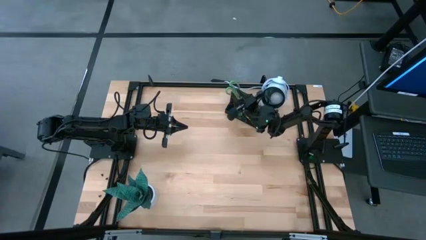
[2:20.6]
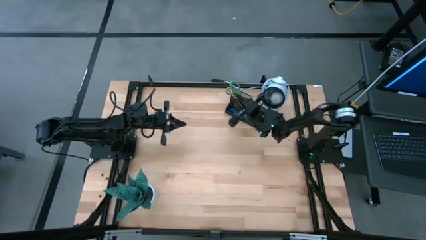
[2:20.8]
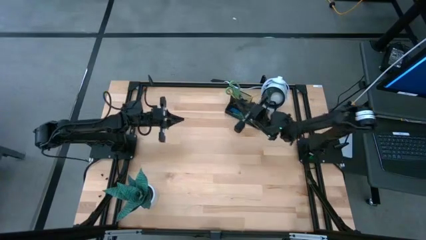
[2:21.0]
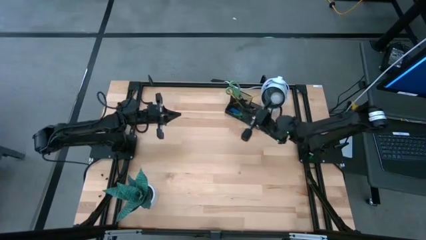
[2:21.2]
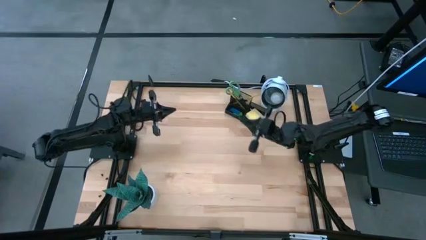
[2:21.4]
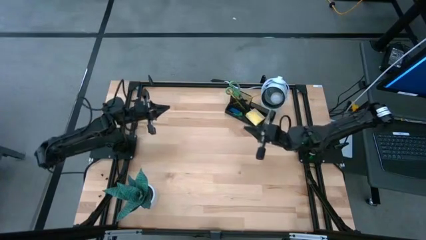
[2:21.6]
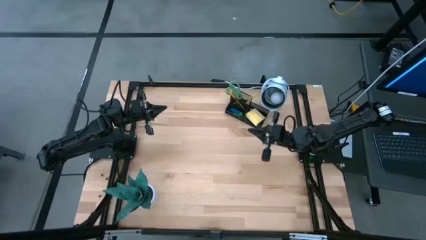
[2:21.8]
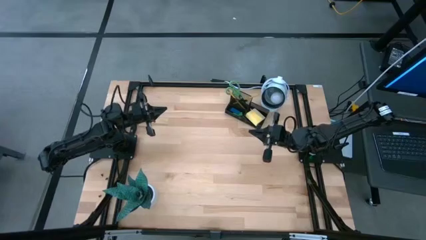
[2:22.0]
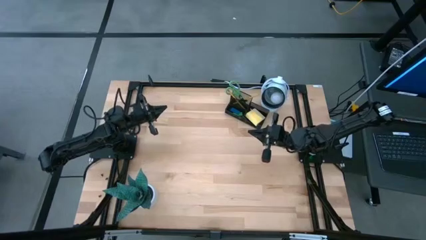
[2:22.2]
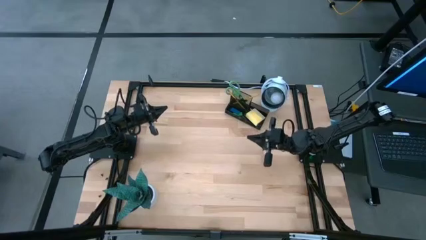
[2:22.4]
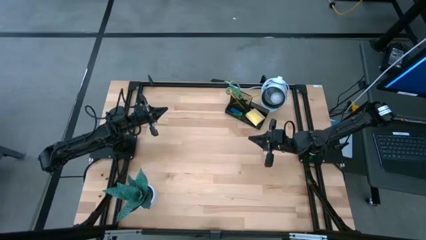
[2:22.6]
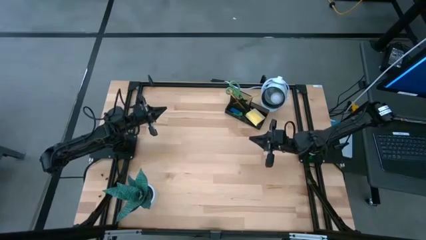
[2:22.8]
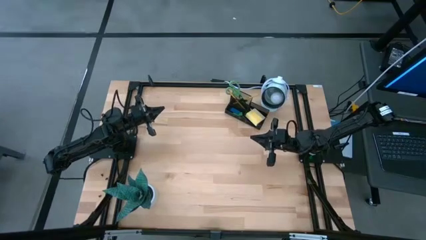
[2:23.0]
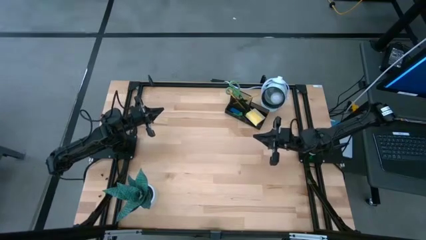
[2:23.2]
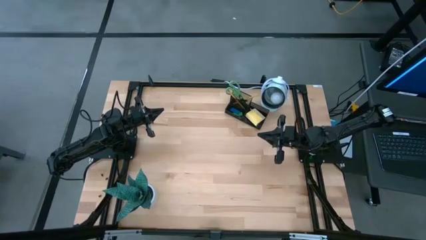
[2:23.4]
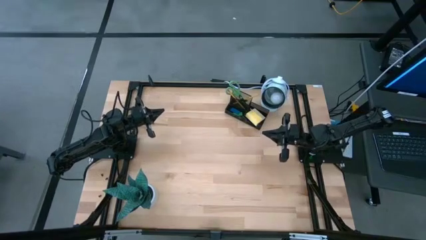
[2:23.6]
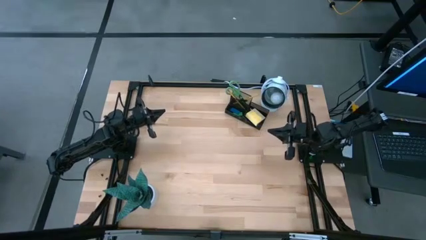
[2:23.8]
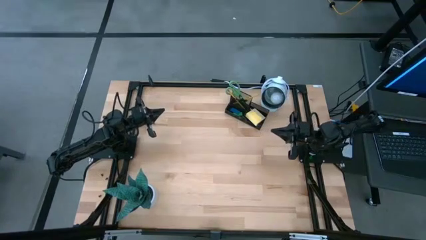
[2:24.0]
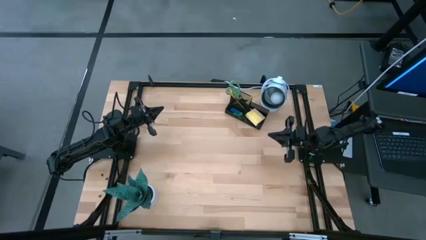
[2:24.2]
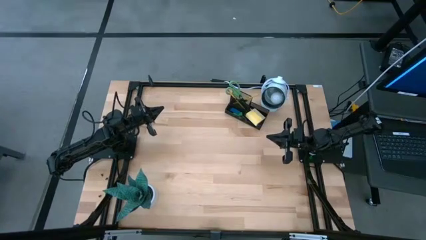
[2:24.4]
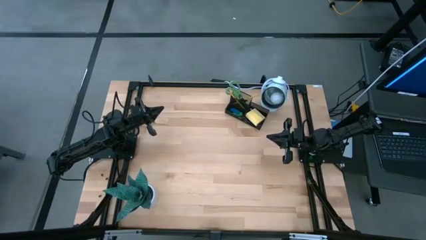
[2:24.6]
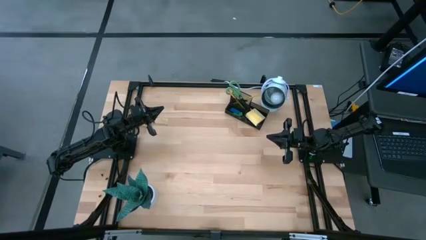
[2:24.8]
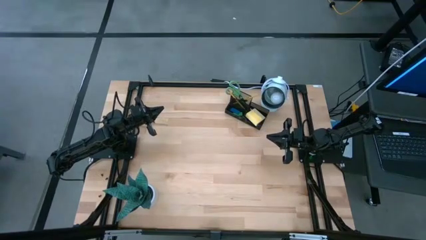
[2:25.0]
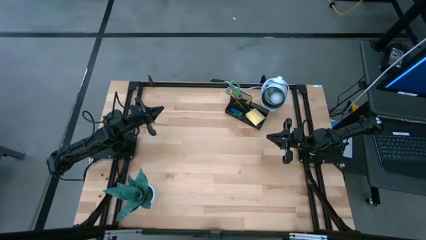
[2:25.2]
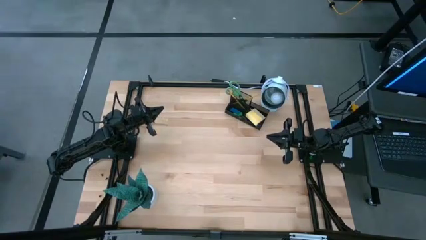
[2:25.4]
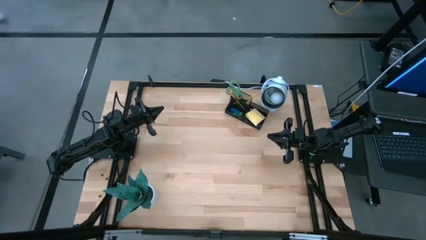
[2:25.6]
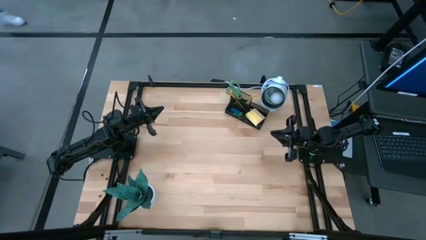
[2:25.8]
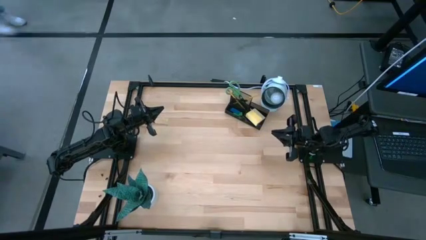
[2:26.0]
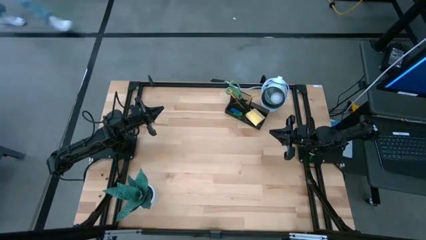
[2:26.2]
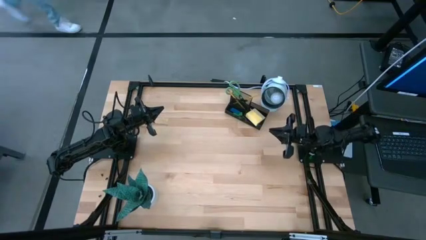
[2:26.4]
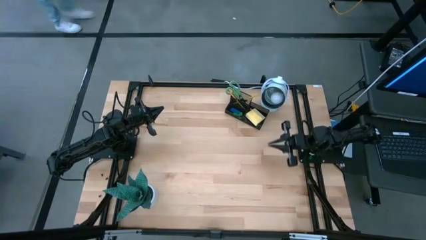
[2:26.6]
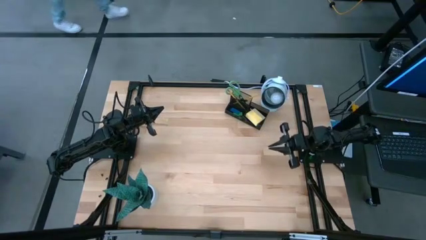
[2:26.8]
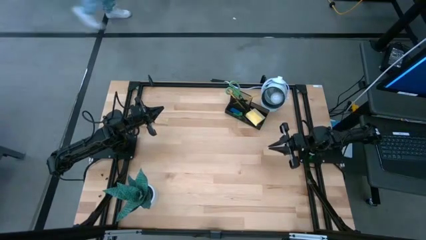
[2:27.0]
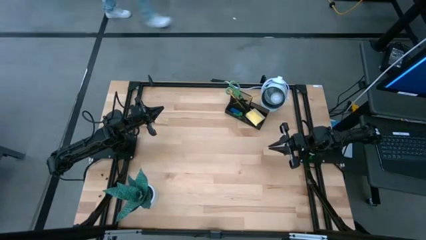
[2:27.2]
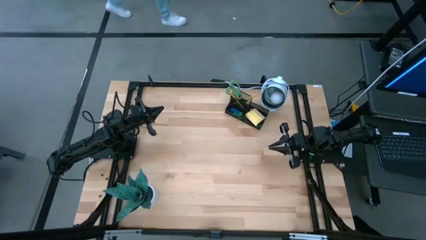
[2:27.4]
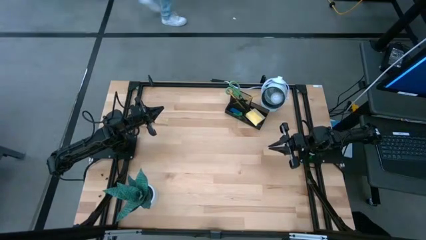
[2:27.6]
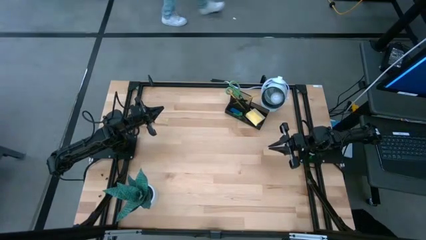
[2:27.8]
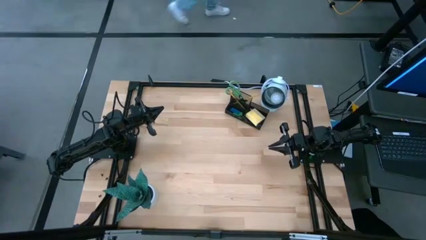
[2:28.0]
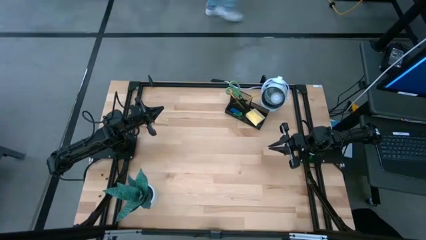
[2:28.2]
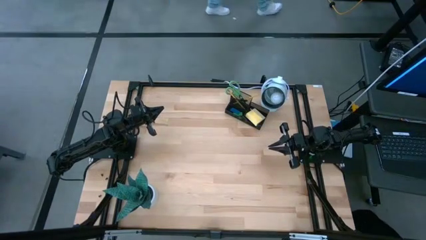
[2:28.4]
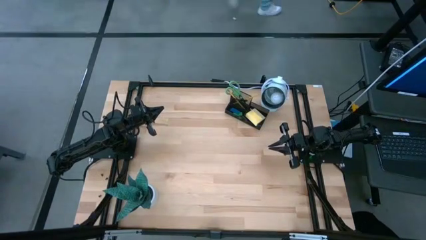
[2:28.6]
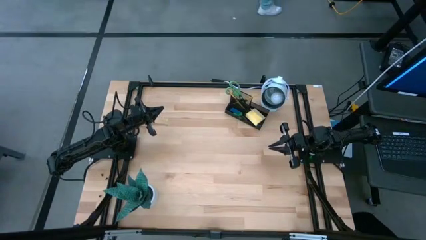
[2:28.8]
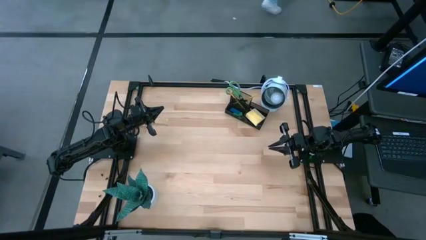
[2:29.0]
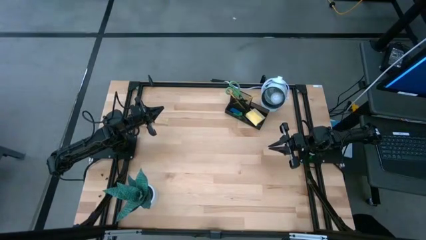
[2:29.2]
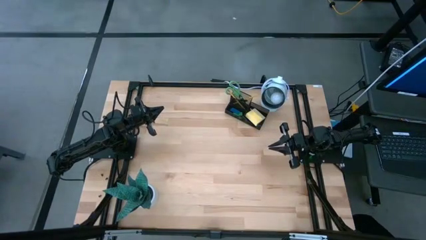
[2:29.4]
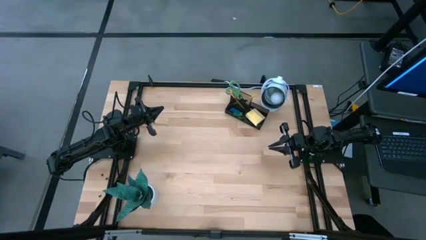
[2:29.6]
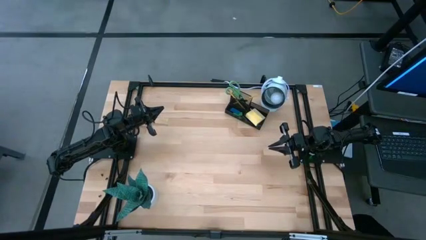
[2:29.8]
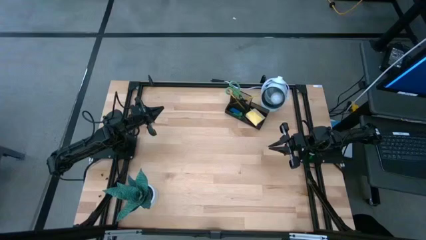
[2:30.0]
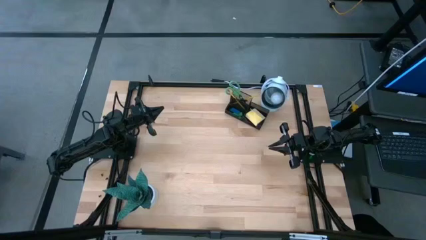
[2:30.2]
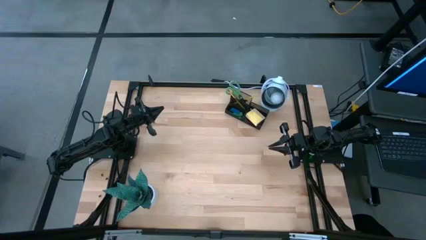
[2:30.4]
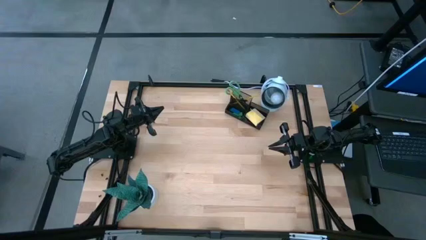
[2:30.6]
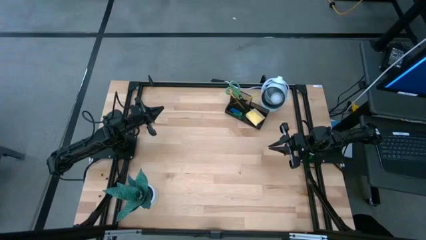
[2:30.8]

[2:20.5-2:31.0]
Task: Pick and place office supplies into organizer
Return to Home Position

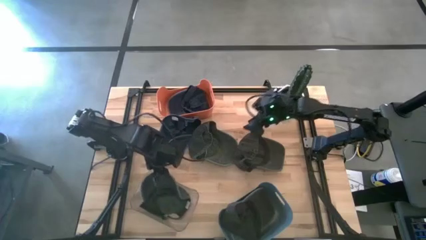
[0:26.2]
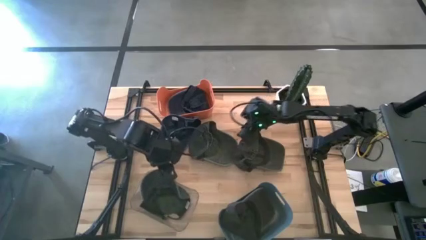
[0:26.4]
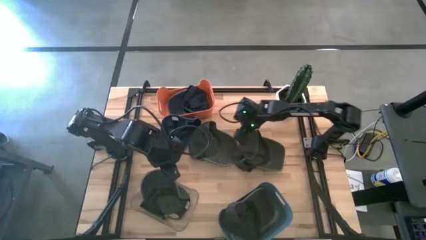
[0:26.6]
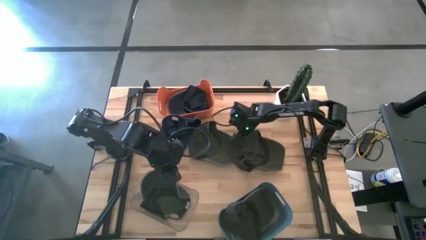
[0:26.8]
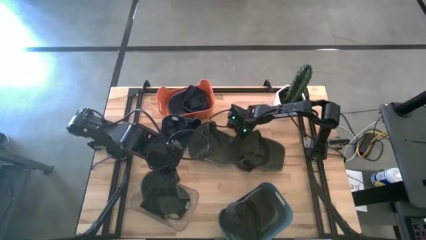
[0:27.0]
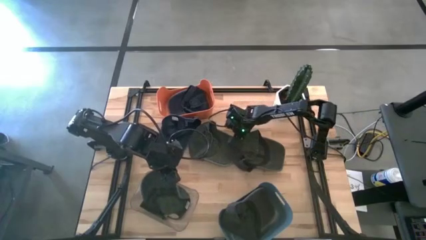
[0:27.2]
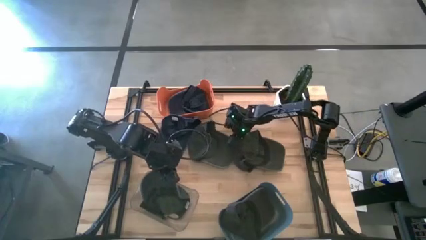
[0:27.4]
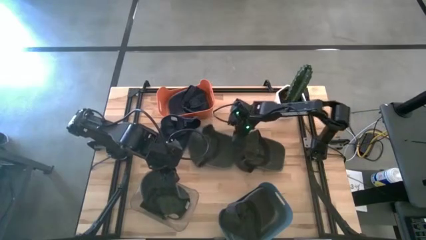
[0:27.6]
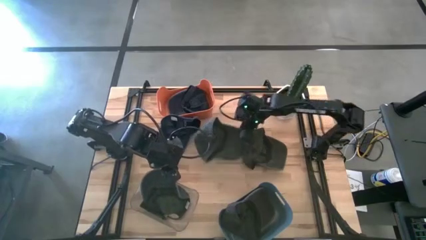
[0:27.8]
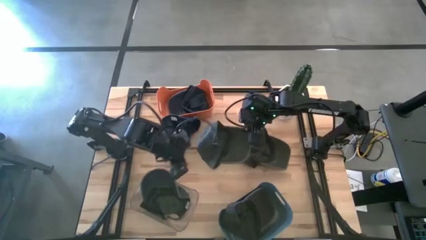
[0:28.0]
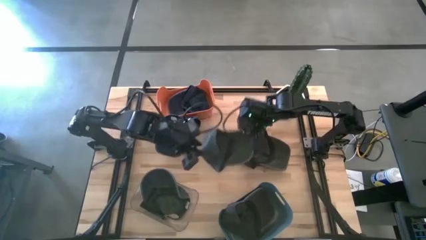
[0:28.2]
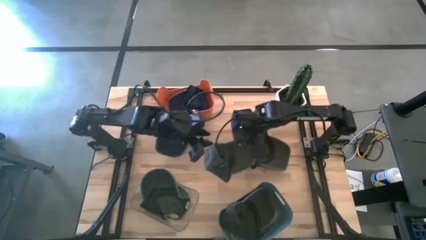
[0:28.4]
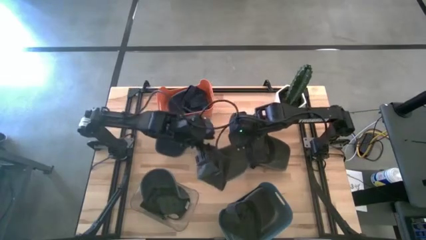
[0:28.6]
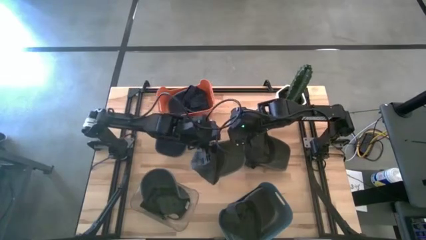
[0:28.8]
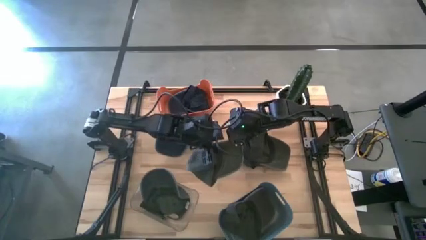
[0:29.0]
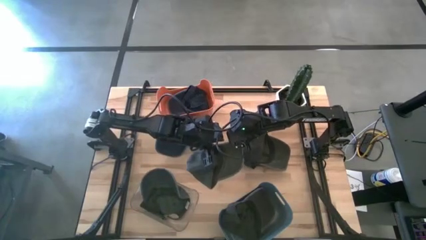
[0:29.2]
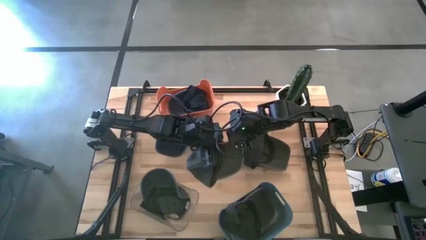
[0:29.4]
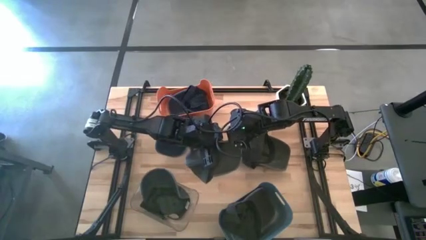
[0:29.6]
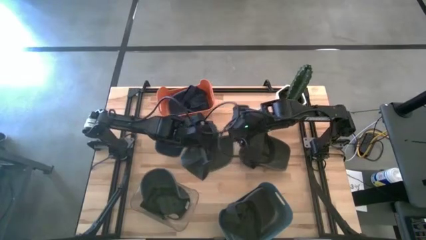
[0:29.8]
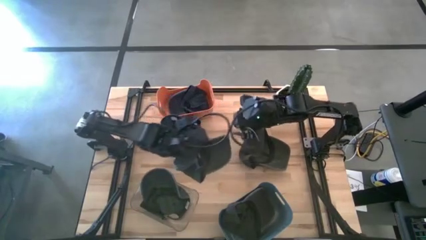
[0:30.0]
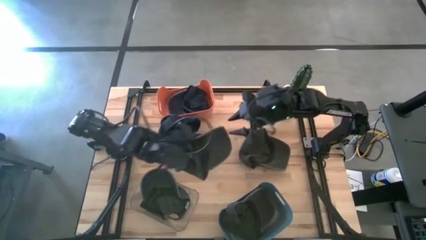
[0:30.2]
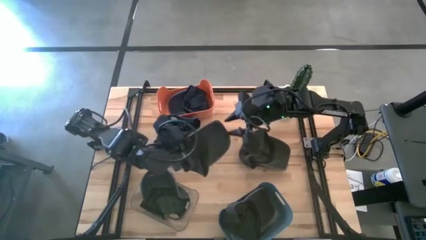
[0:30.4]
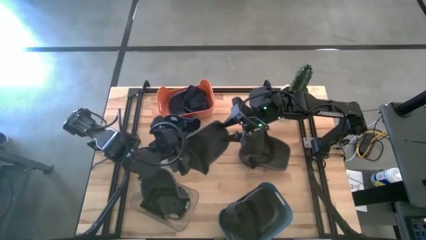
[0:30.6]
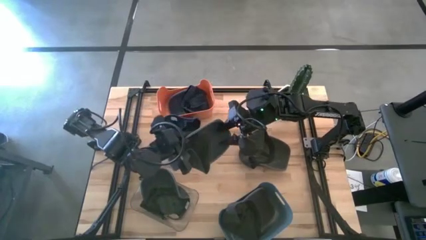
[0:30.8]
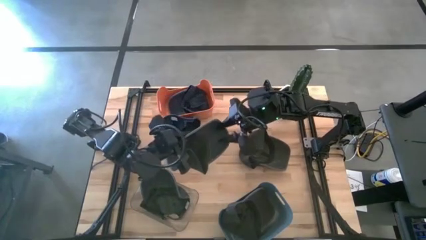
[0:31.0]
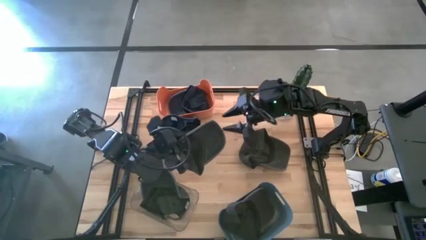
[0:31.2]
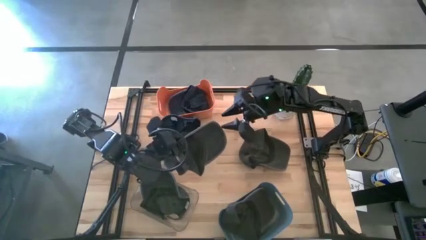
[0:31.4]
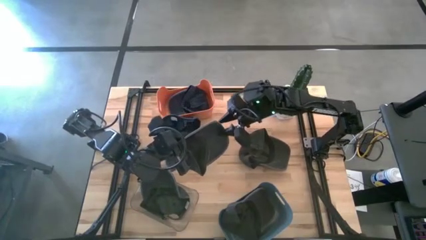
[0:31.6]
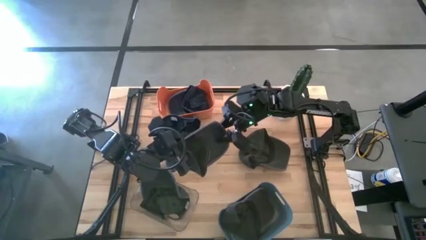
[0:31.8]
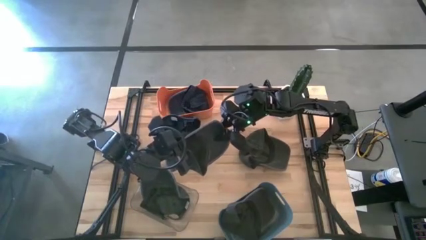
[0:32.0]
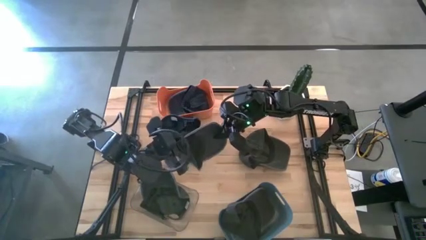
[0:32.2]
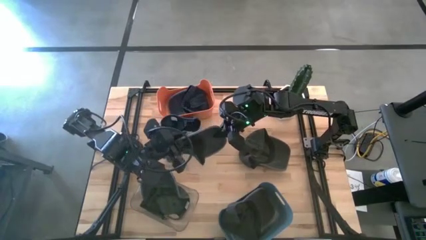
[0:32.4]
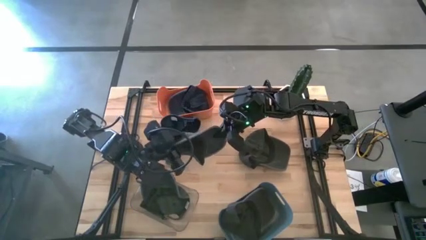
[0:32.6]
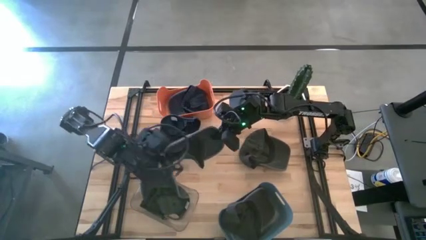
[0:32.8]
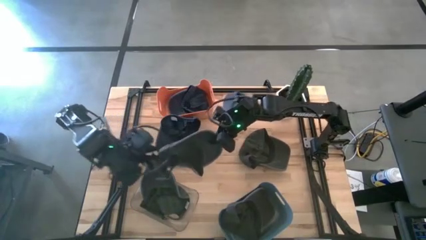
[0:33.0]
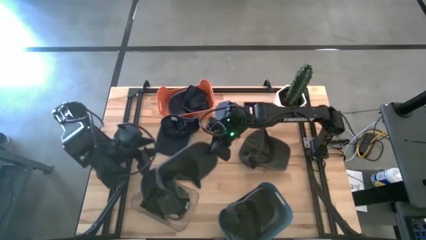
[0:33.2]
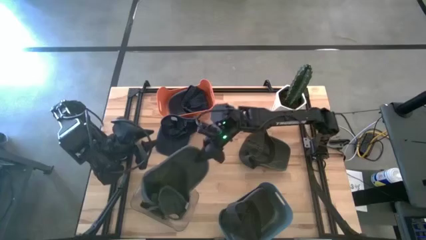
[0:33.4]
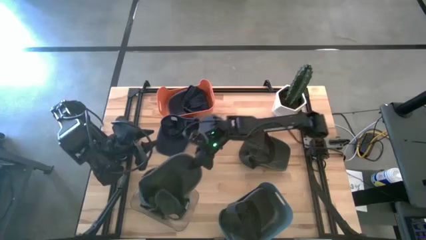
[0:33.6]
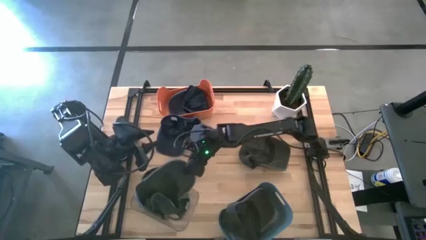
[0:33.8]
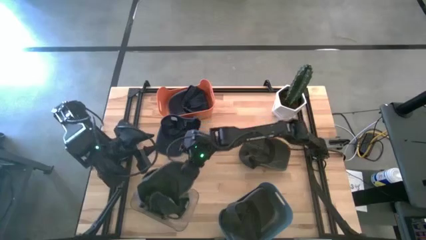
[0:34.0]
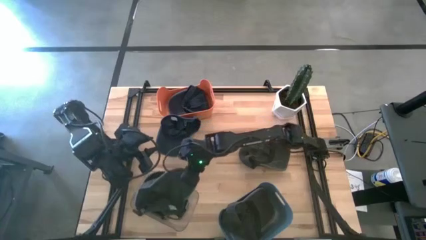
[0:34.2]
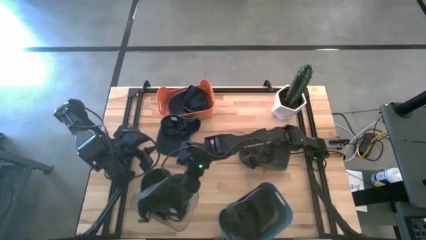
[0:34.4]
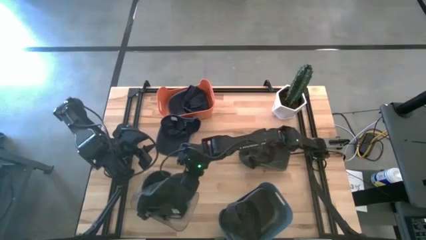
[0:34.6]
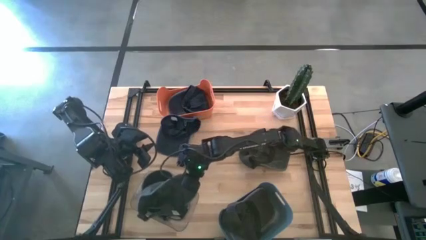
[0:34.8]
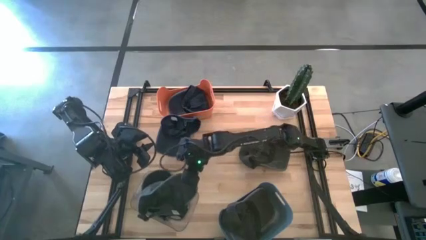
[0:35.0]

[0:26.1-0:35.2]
Task: Pick & Place hat
Put the gray cap into the transparent bin
